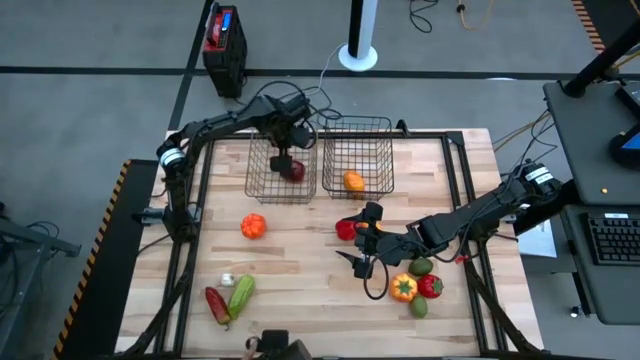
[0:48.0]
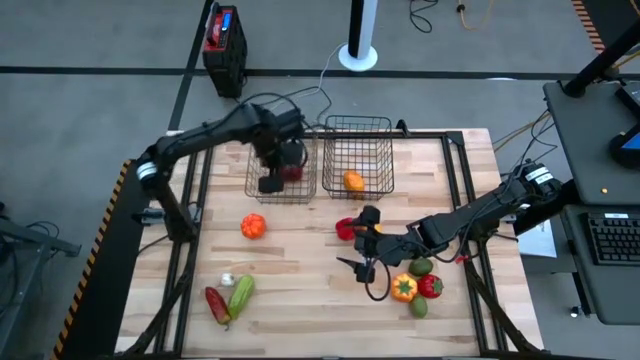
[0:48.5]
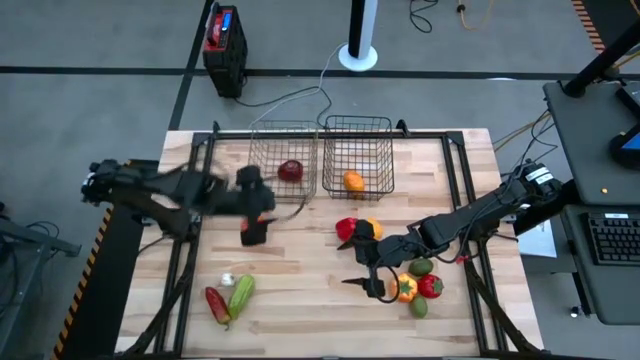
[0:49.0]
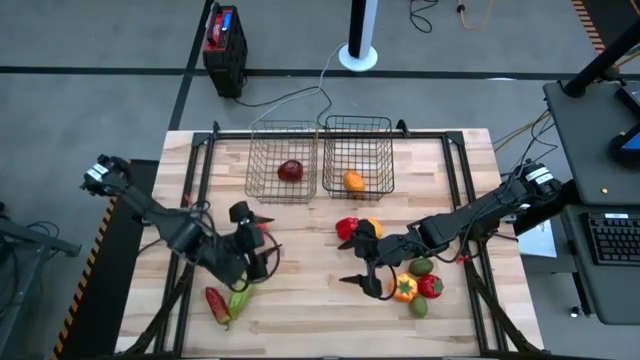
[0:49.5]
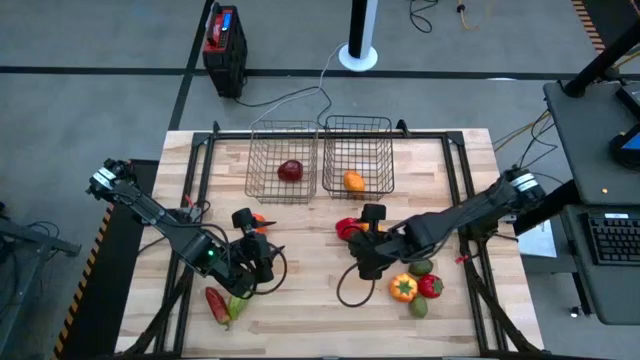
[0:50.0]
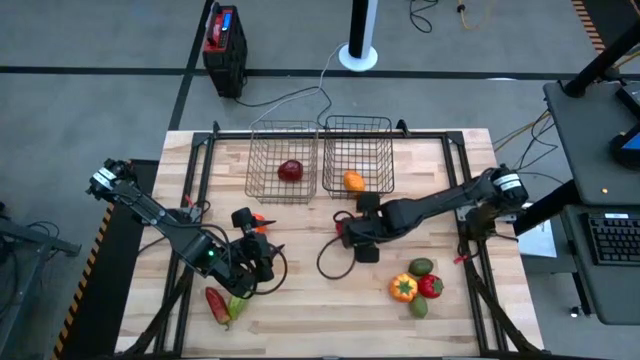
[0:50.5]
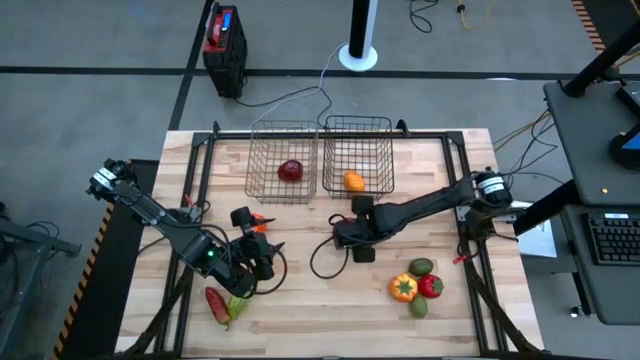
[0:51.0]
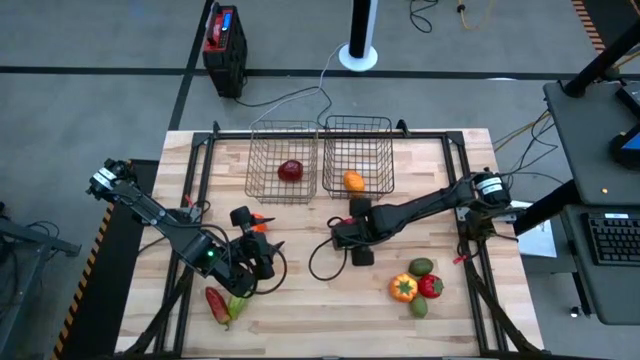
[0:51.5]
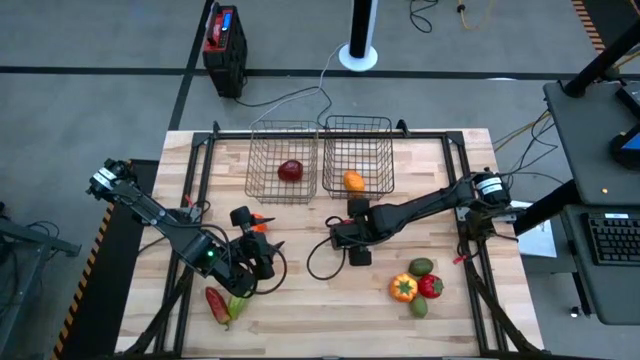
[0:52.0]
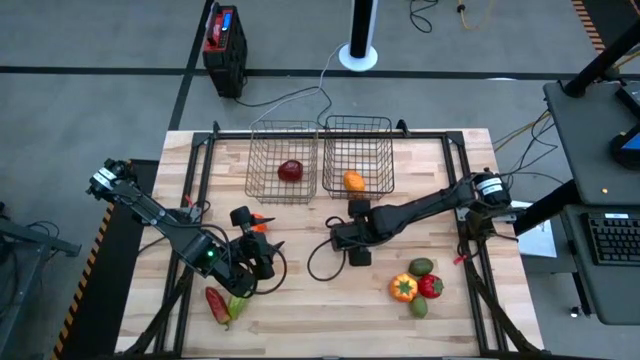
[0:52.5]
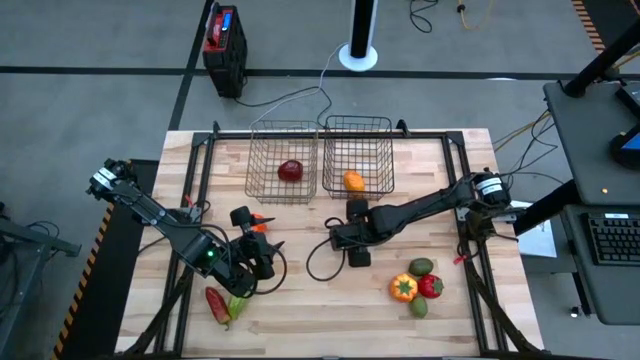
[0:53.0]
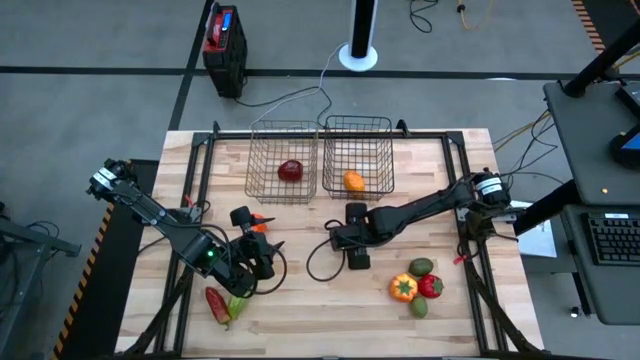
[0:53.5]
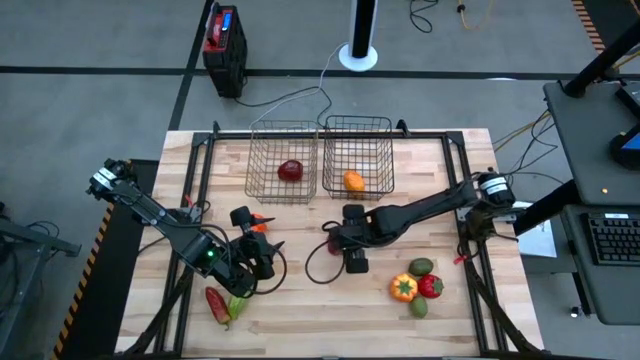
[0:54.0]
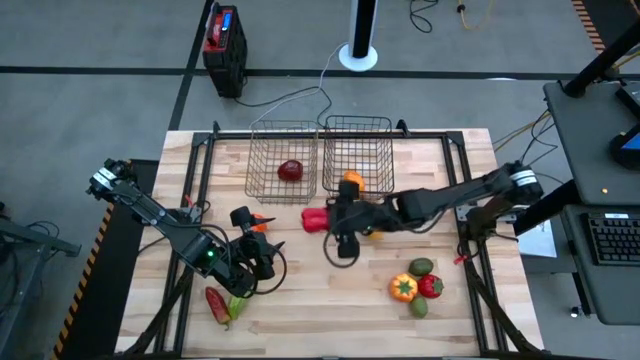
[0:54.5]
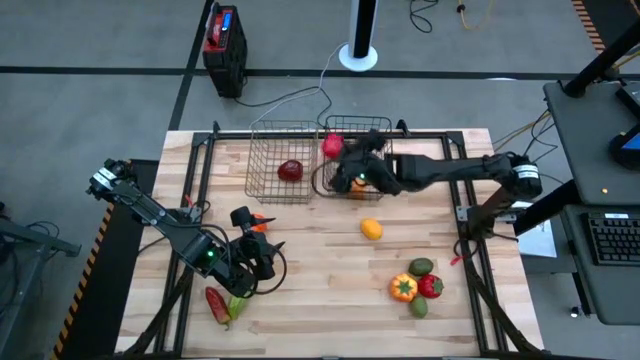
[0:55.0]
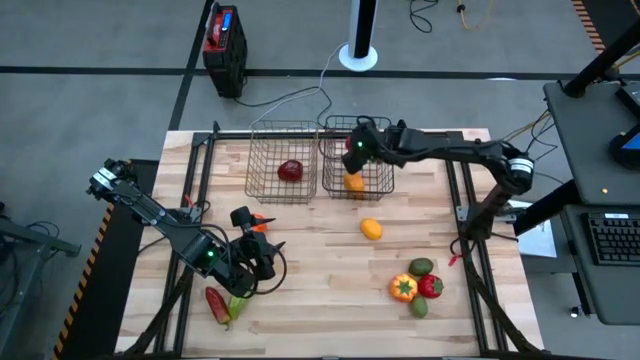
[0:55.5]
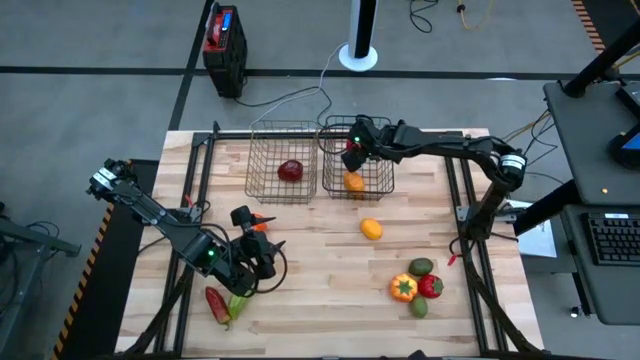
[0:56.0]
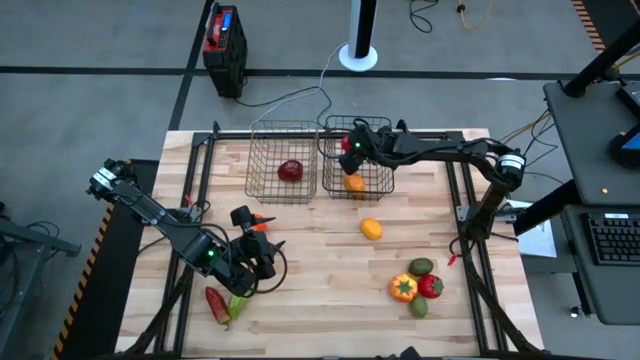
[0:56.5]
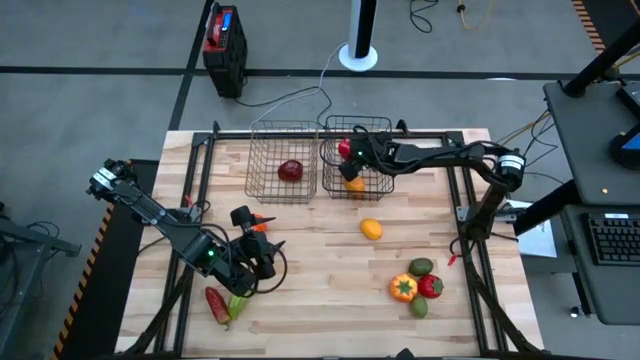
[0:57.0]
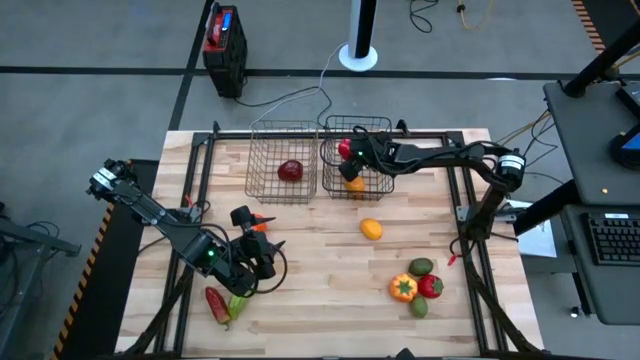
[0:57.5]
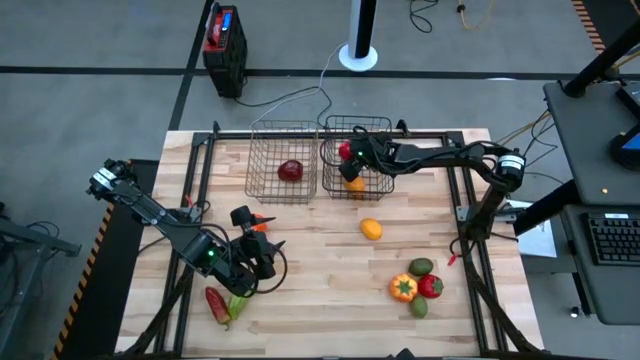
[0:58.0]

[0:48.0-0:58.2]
Task: Sort produce into baskets
Put the red bell pepper into the black wire basket

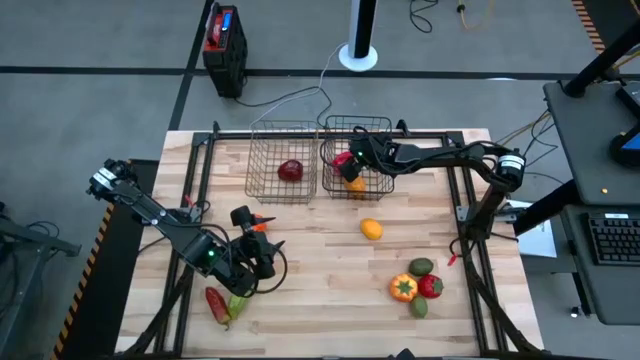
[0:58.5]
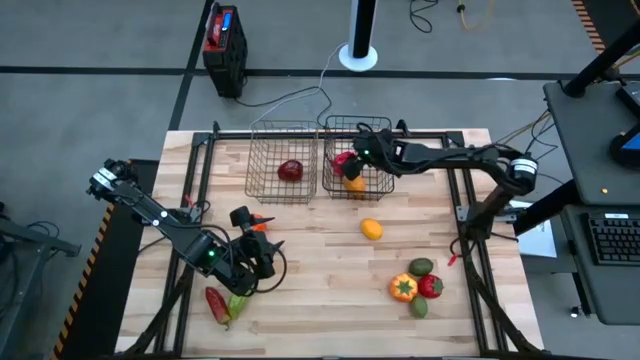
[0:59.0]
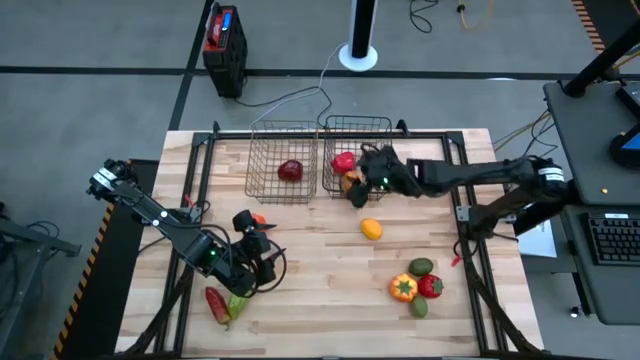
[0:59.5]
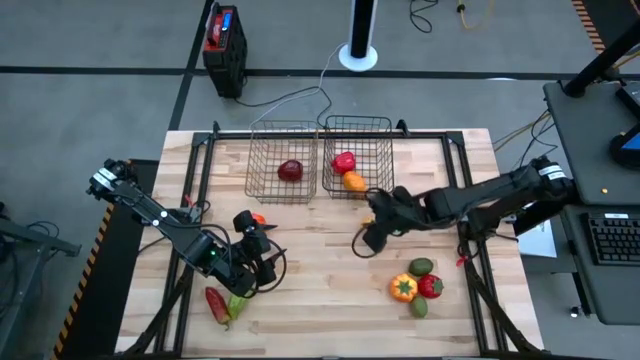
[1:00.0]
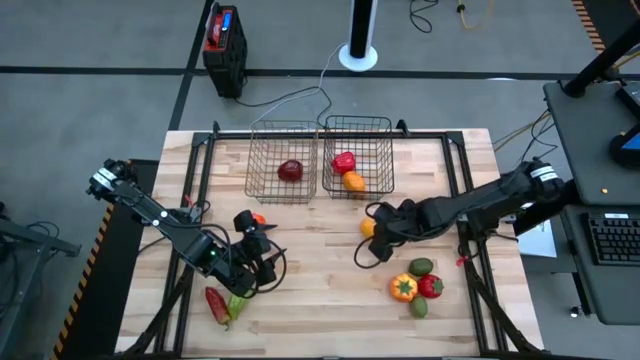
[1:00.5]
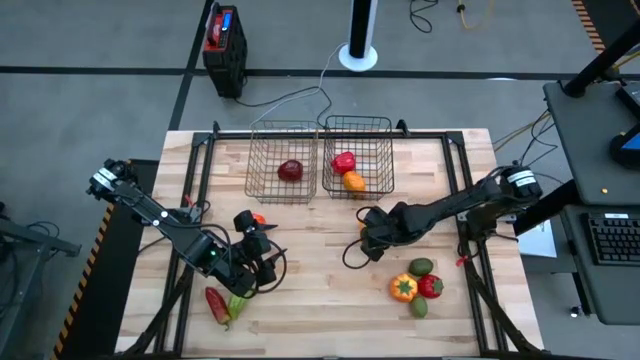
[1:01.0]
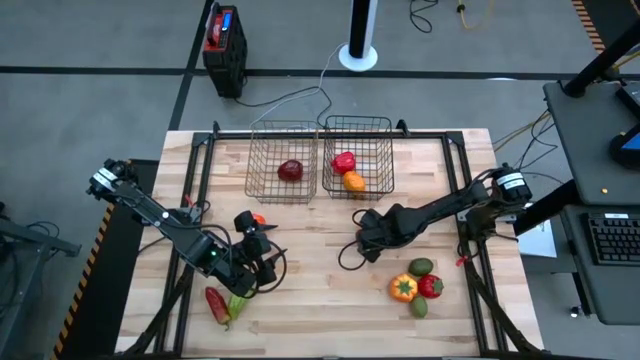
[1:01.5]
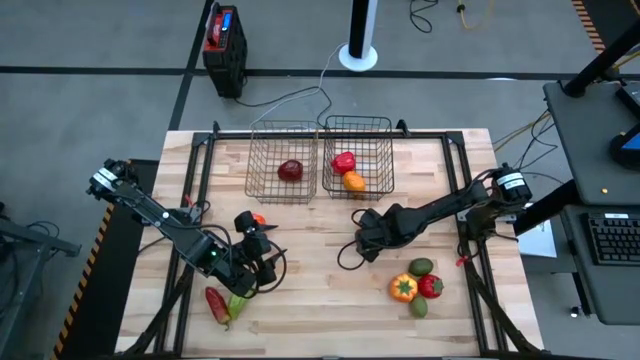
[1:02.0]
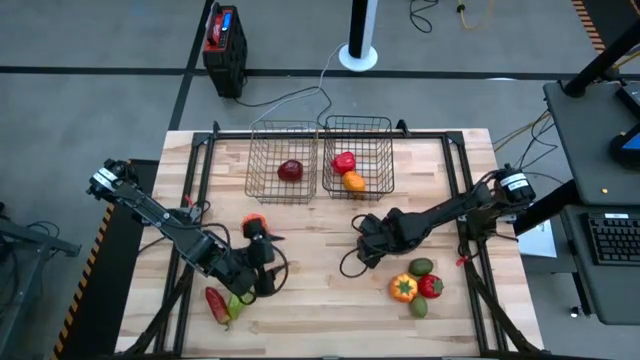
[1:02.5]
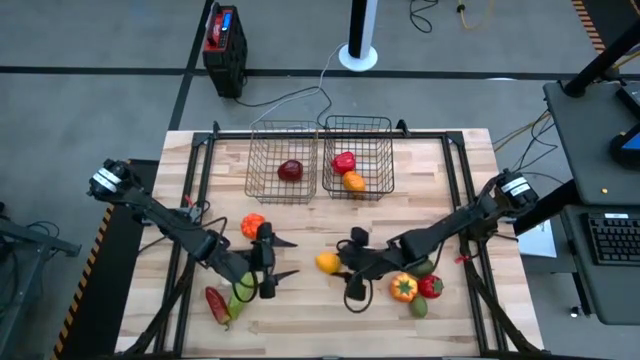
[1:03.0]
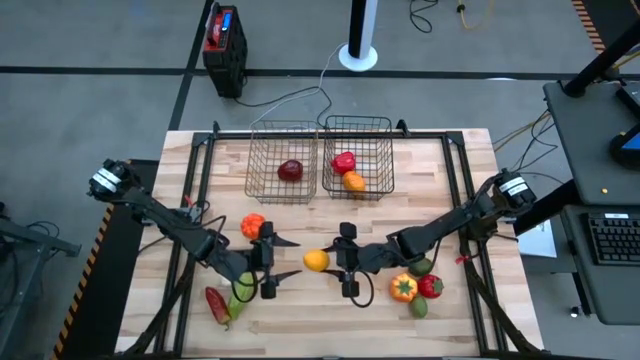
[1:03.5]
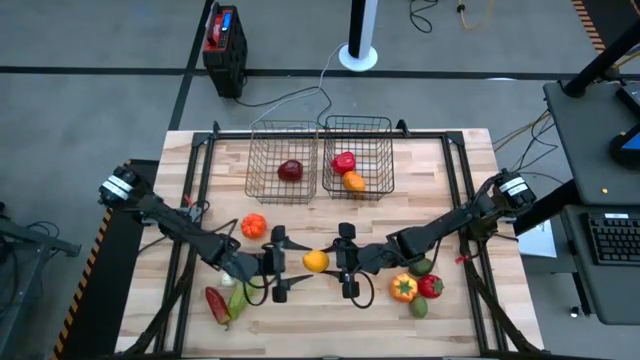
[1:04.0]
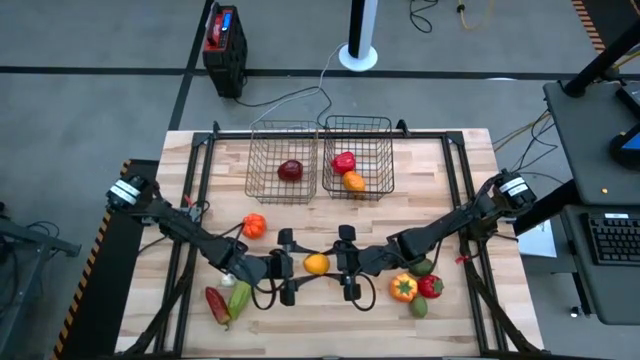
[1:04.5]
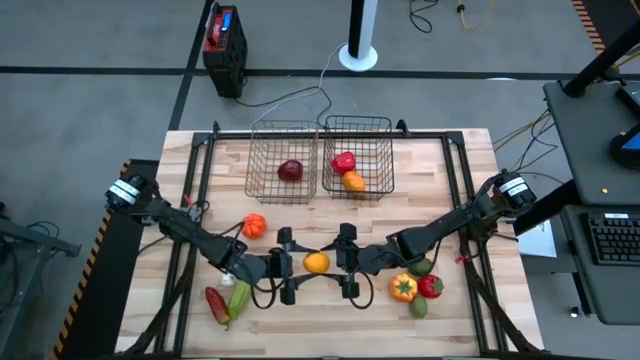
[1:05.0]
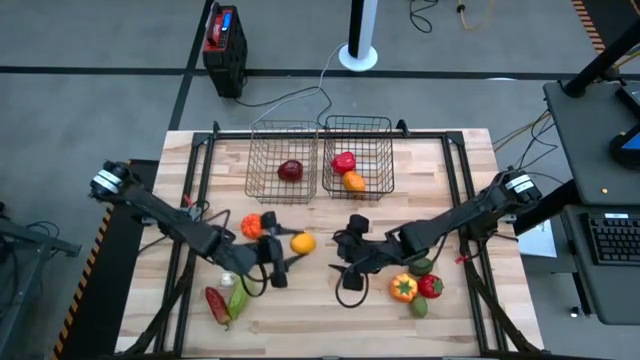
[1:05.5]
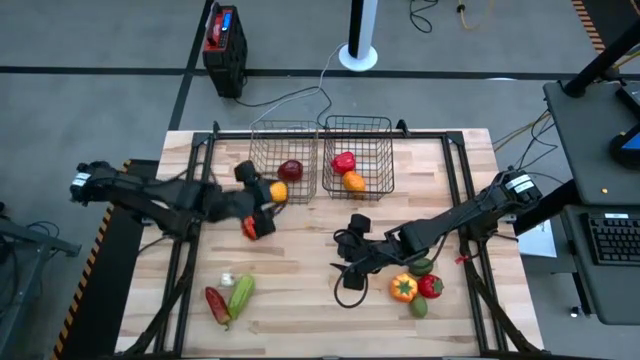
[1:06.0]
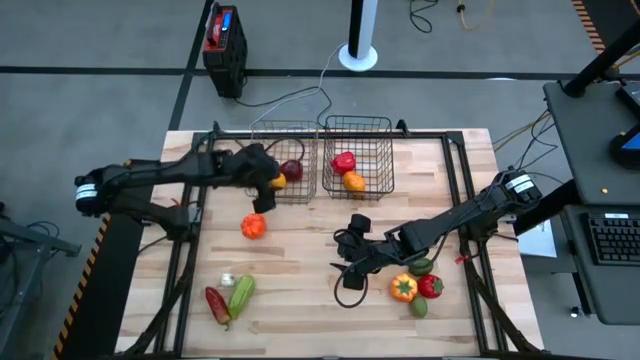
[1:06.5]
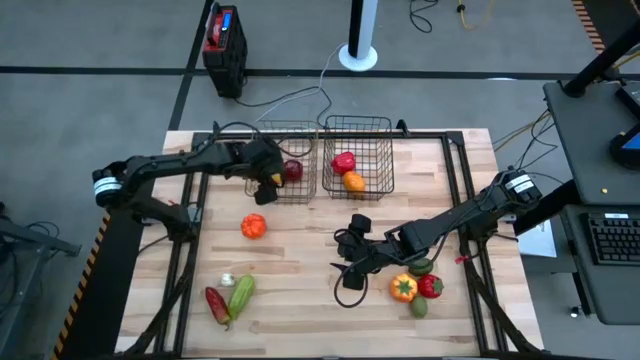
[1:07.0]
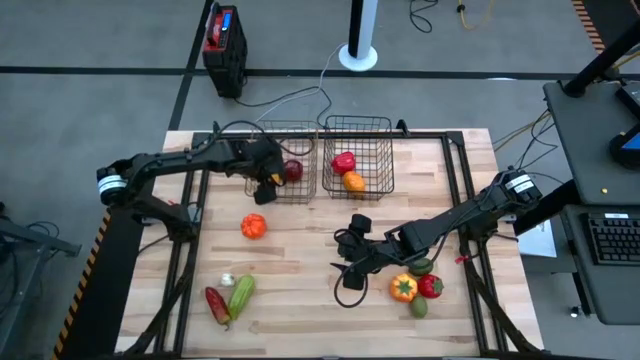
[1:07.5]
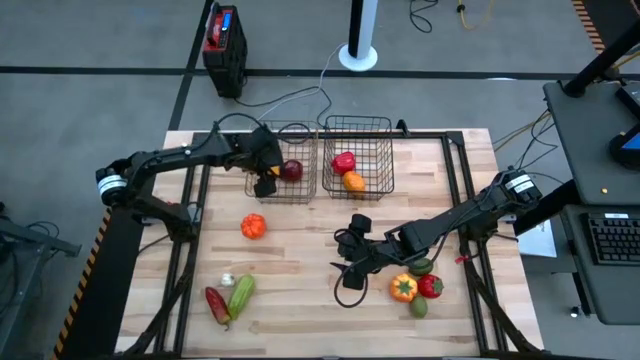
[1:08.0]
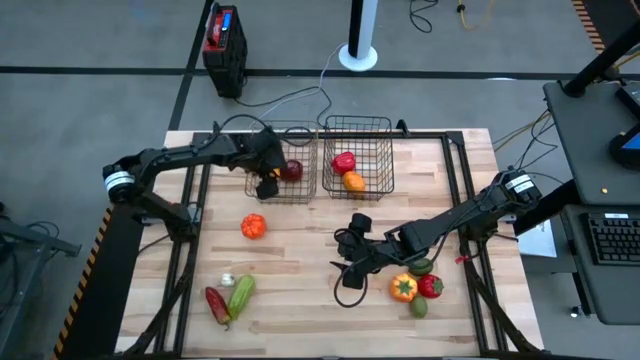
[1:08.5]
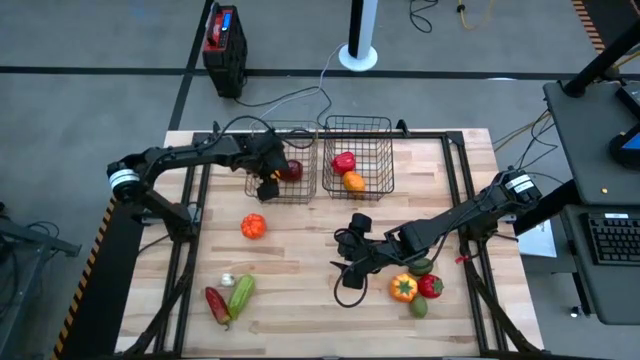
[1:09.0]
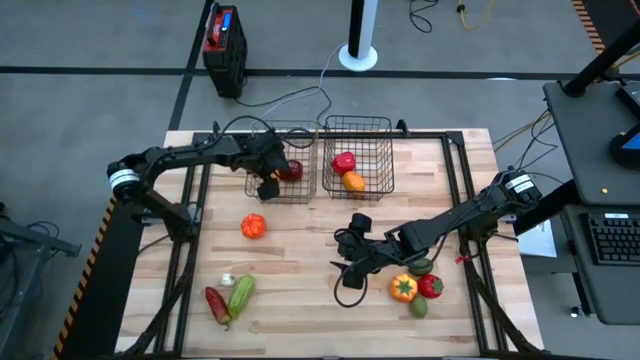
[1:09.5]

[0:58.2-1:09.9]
Put the yellow lemon into the silver wire basket
